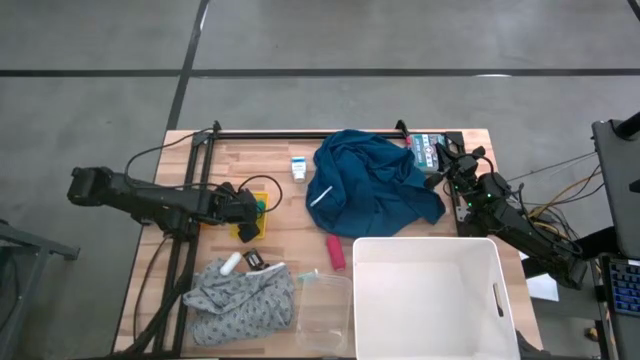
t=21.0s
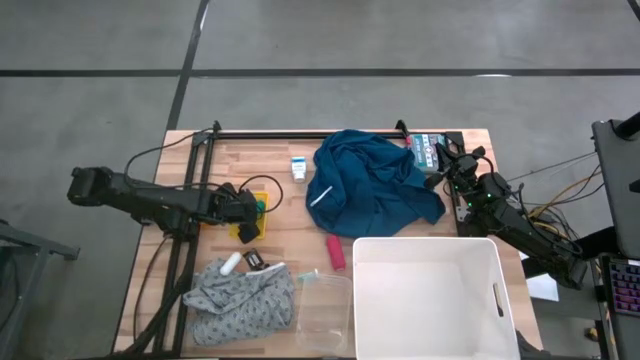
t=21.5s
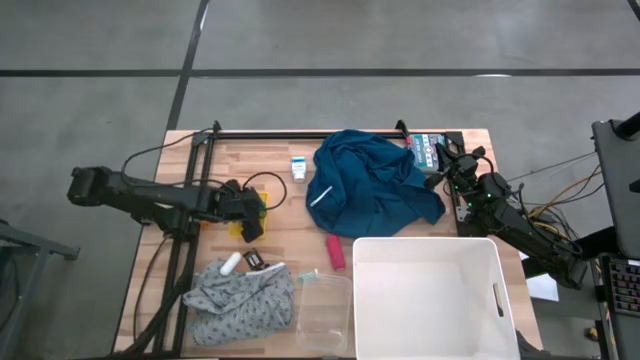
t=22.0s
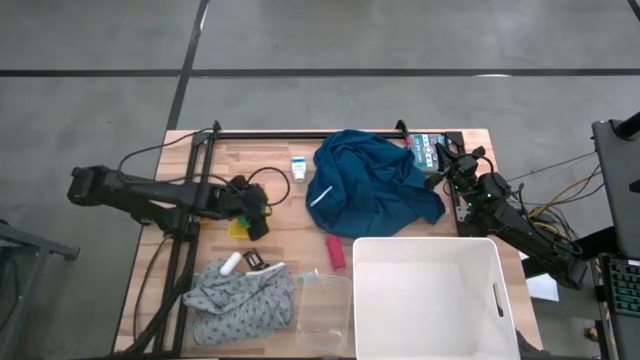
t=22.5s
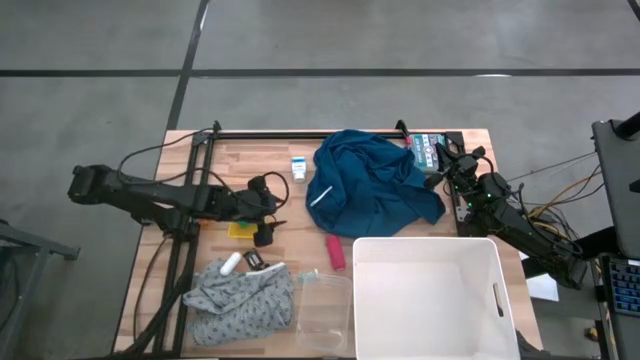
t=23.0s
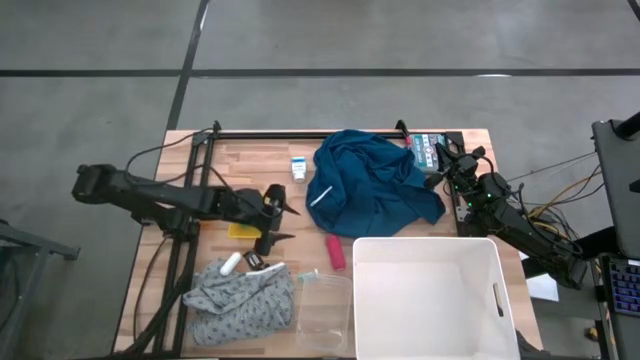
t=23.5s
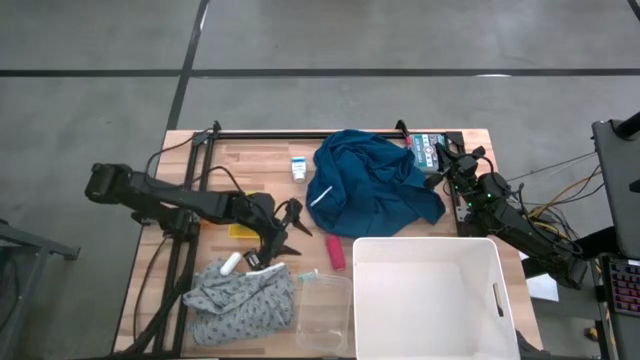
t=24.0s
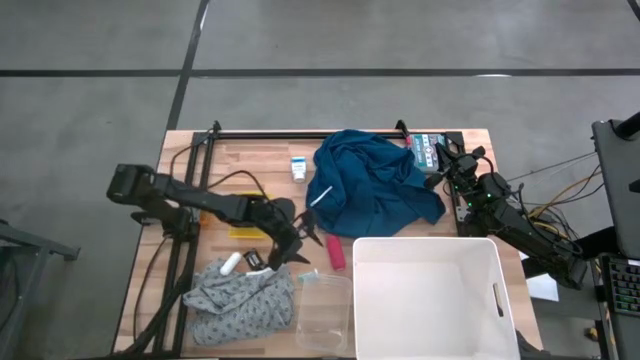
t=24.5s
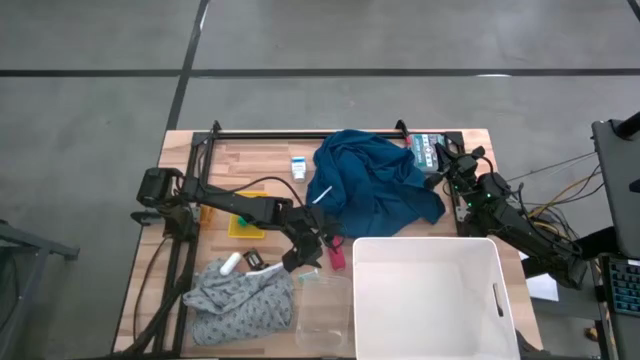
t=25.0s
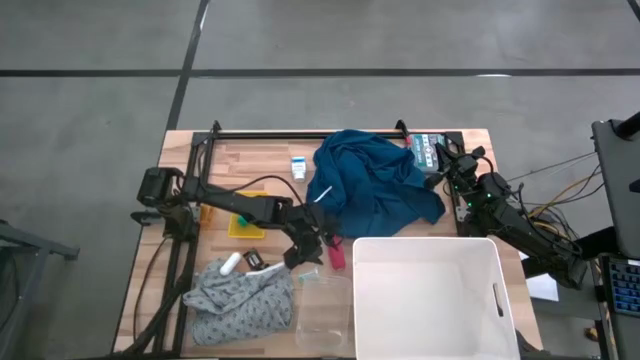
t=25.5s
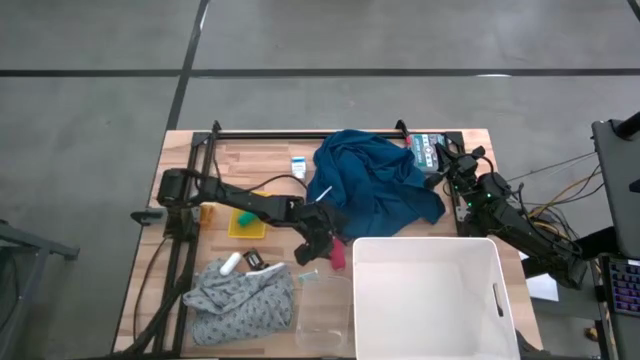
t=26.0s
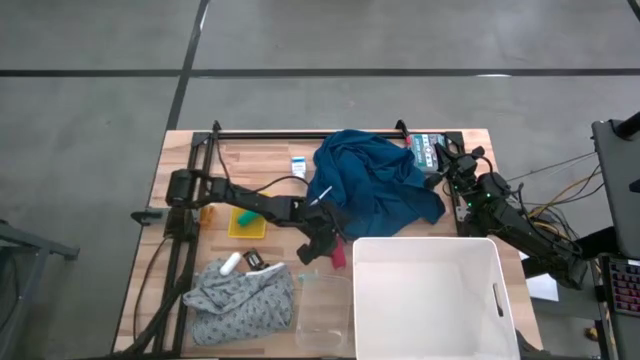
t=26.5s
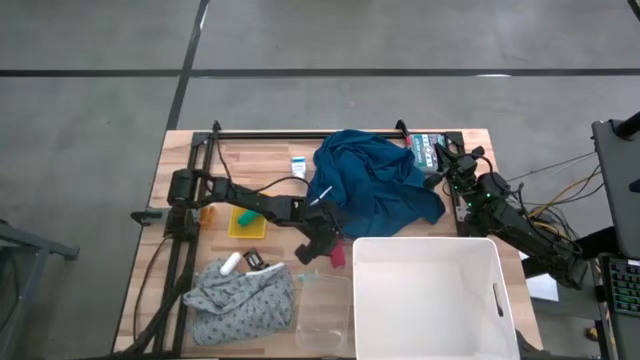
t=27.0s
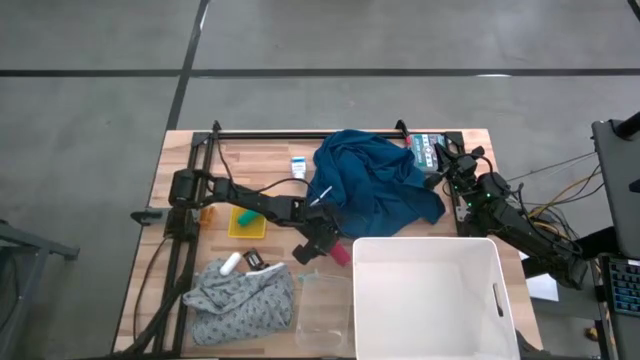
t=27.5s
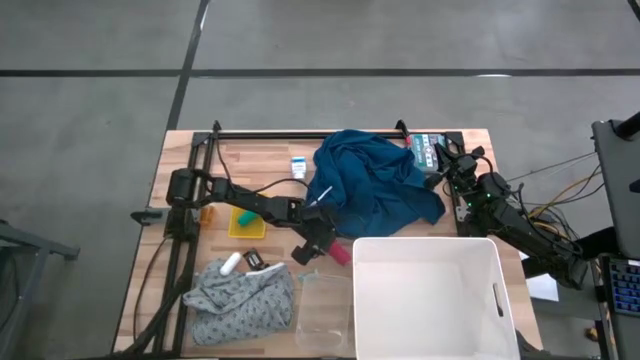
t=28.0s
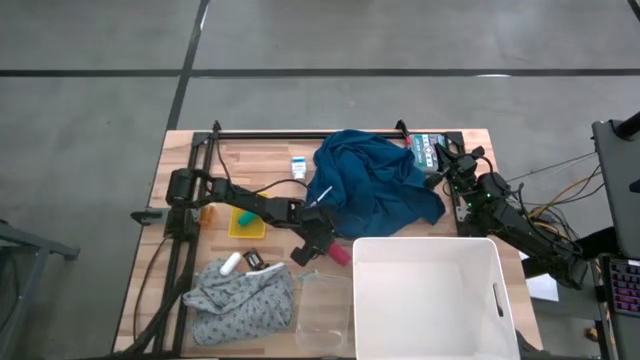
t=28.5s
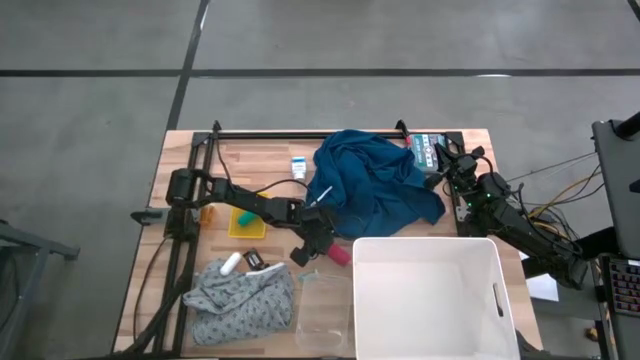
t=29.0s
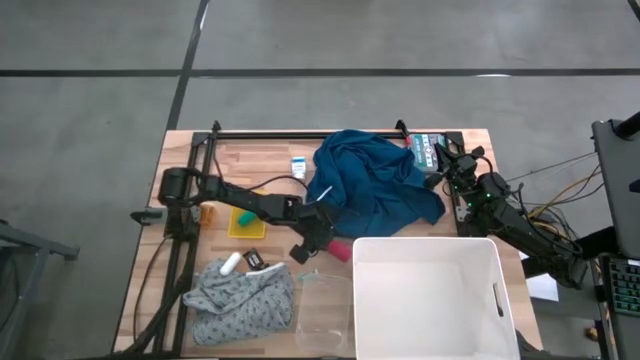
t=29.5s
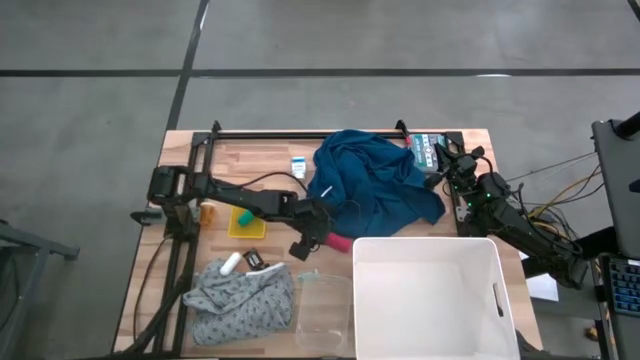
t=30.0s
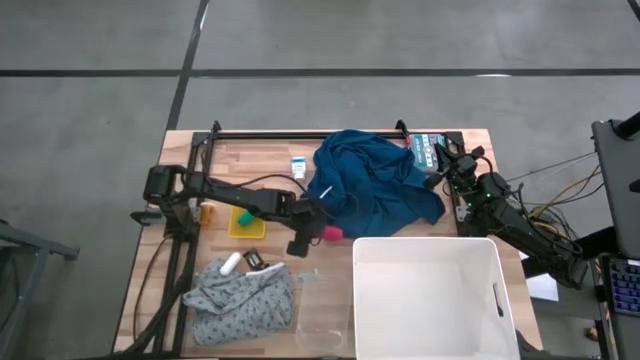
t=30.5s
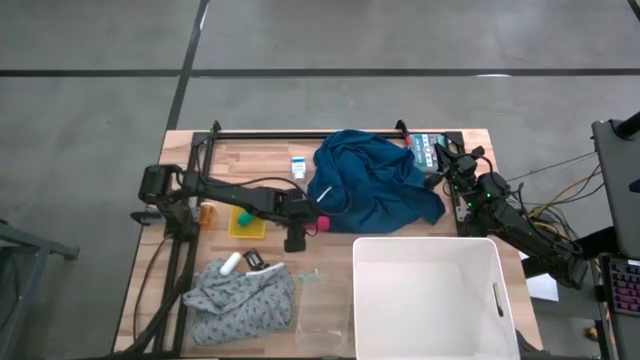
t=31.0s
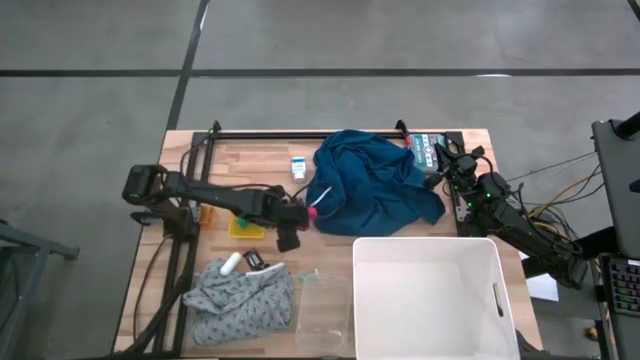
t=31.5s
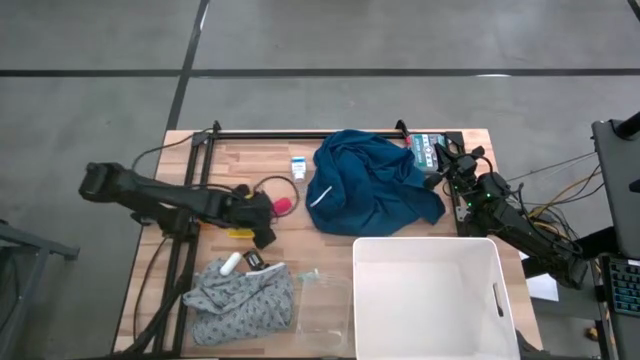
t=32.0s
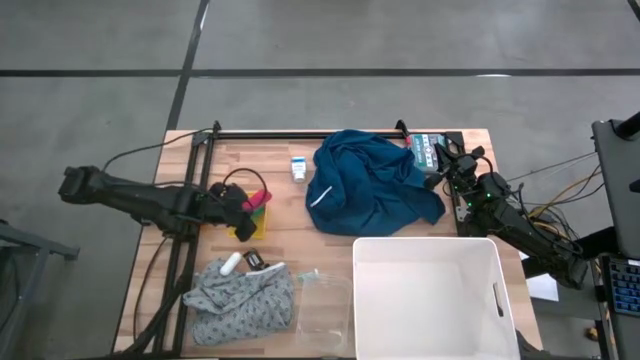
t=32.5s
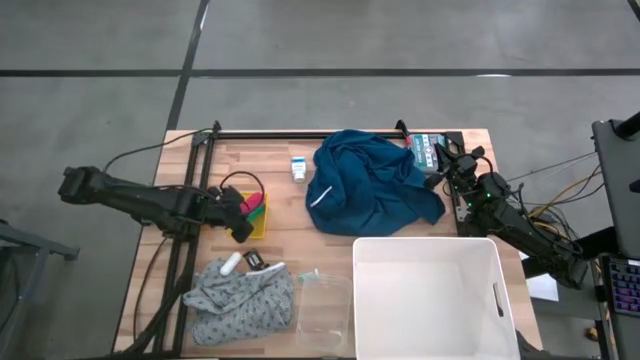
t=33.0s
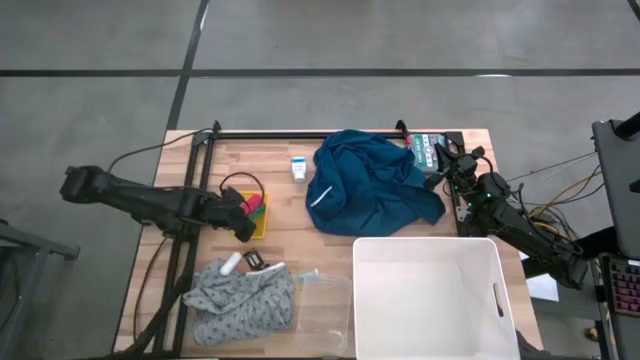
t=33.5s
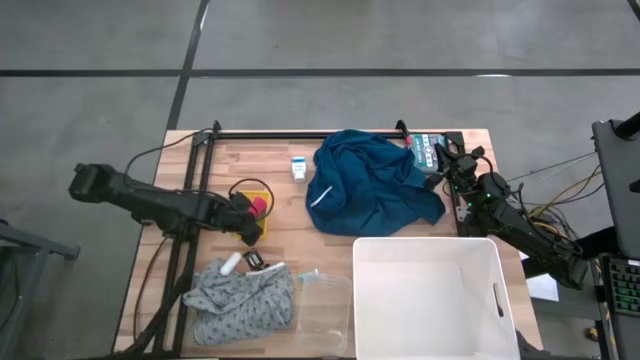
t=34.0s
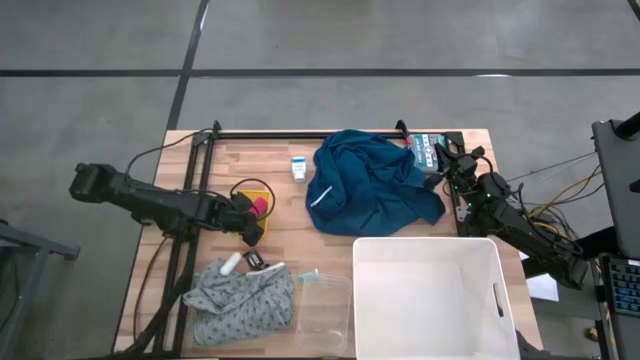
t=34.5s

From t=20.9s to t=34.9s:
Task: Pick & Place Medicine items
Put the red rolled bandage into the yellow bin

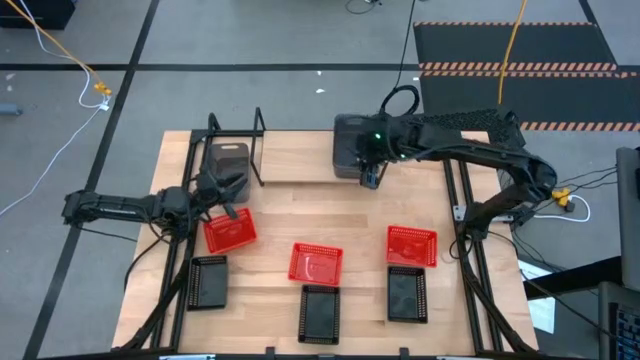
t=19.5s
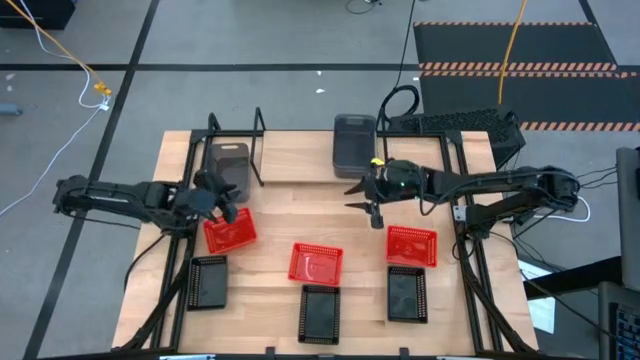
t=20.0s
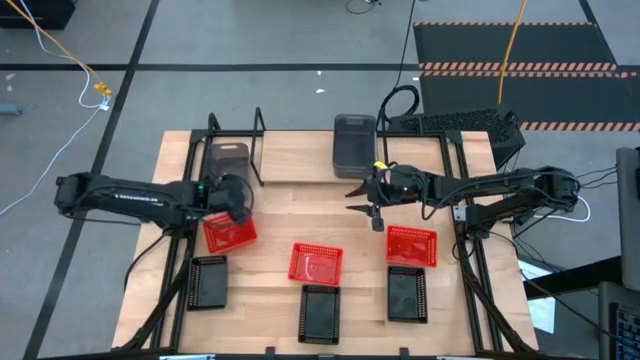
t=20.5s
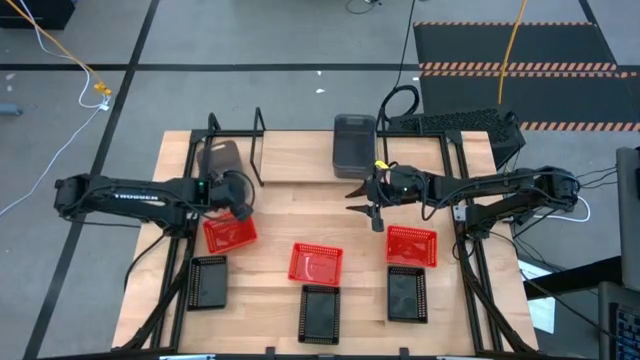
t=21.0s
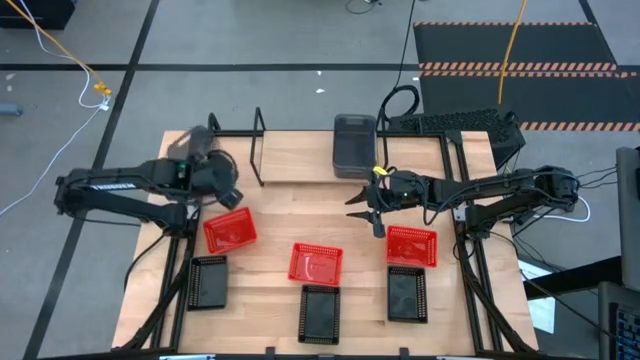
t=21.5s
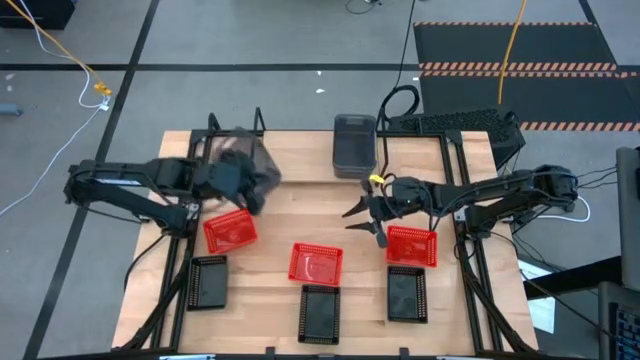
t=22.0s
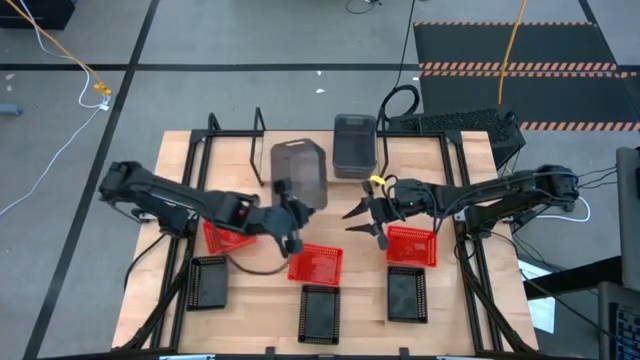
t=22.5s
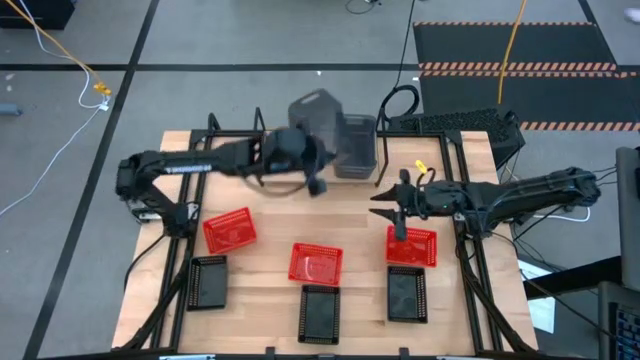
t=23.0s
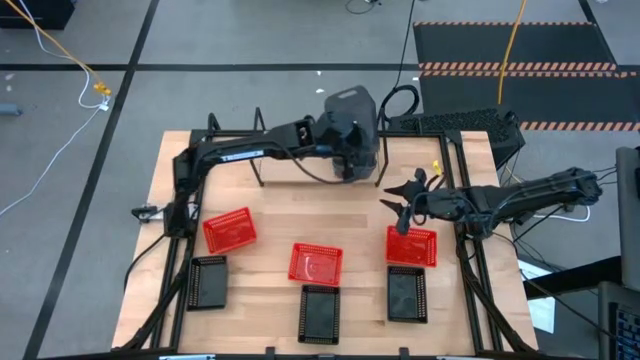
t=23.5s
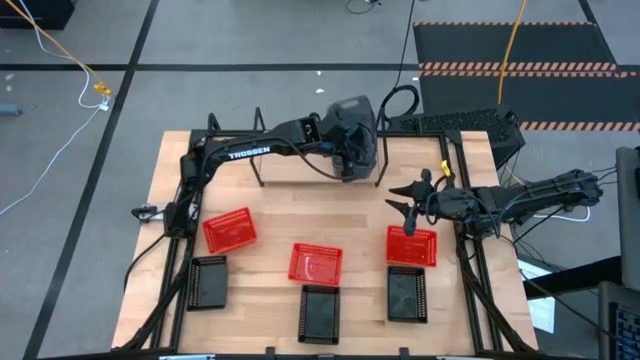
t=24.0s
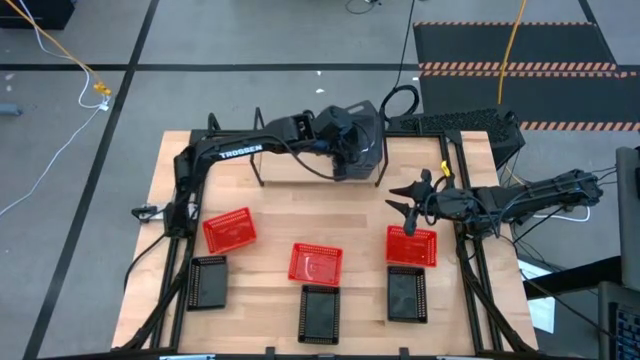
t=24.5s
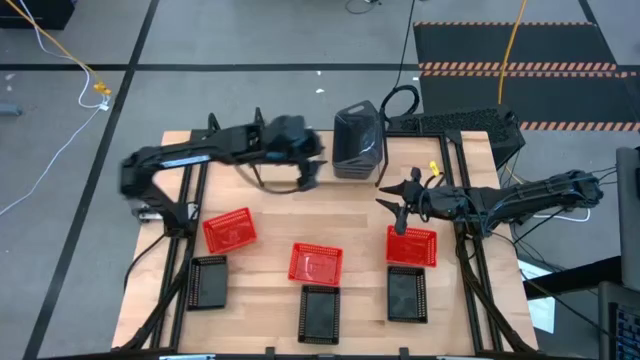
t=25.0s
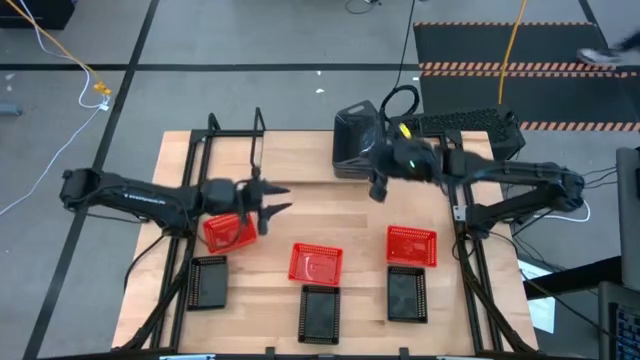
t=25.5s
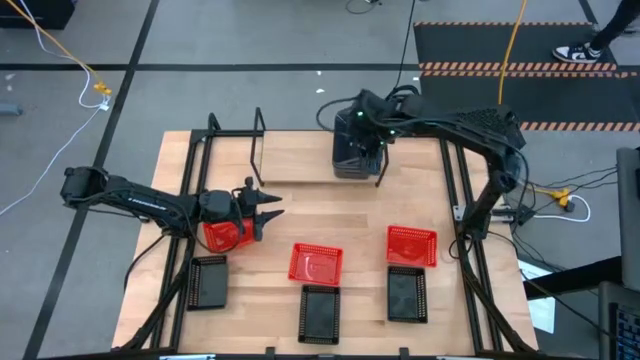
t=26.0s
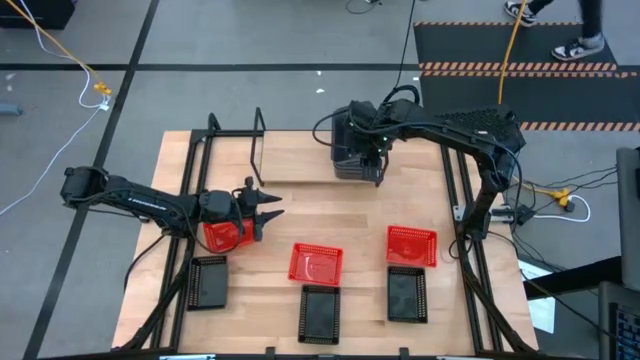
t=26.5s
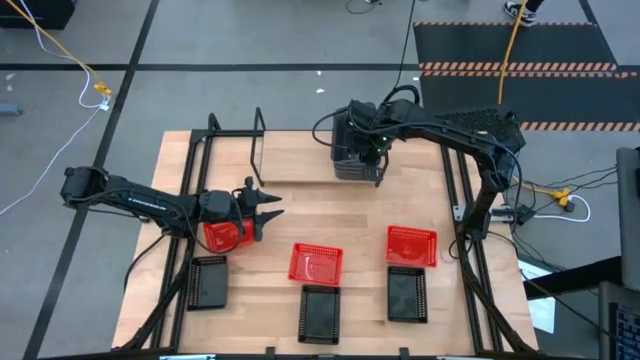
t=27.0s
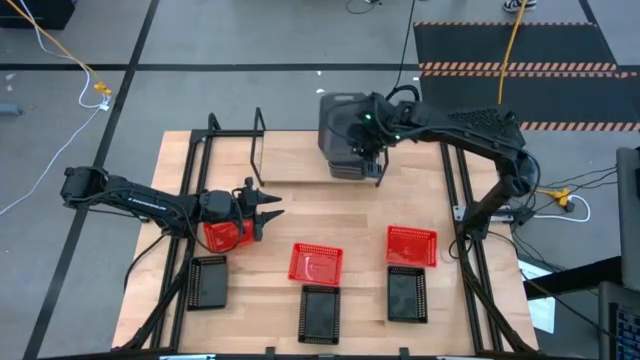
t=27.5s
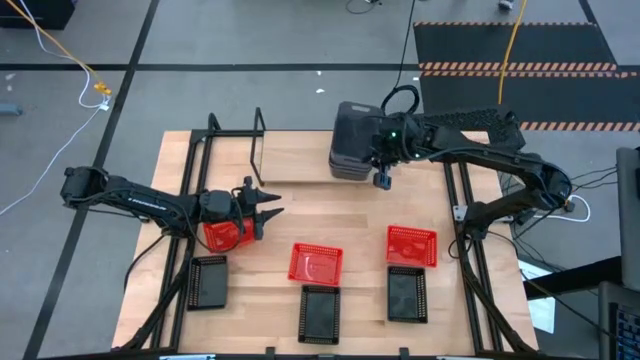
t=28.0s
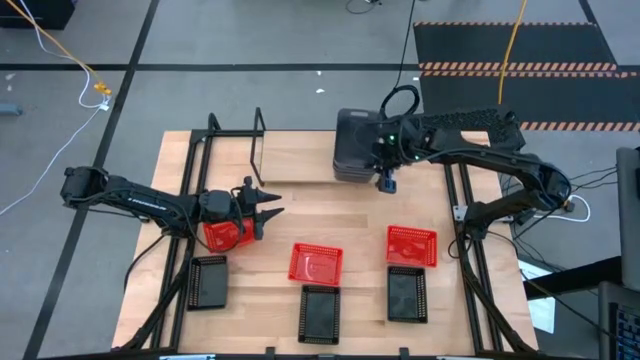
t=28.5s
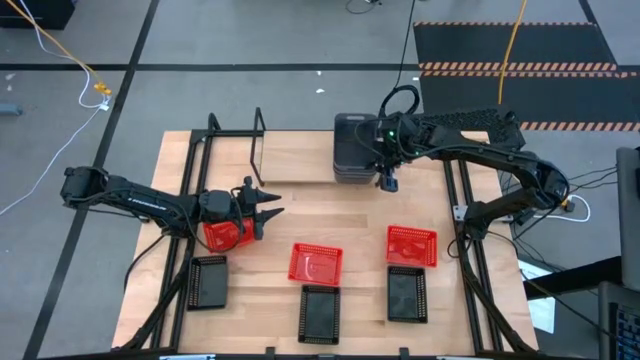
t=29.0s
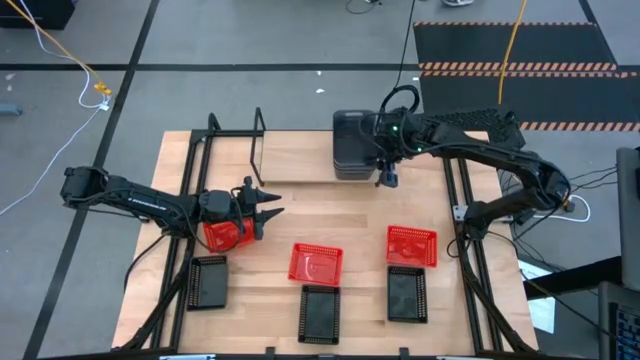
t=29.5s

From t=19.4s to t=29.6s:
Task: Stack baskets on shelf by color
Stack the transparent black bin on top of the transparent black bin on the shelf
